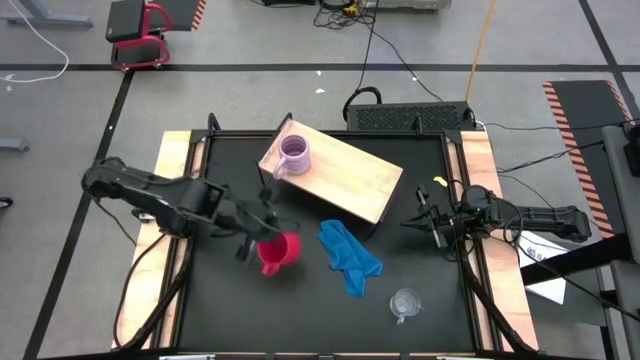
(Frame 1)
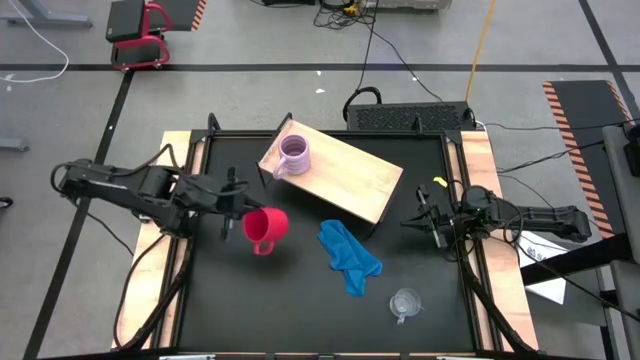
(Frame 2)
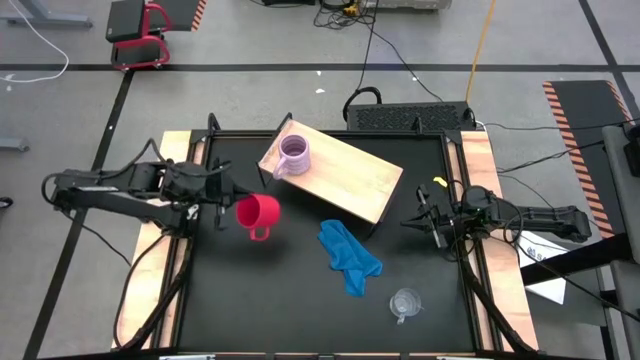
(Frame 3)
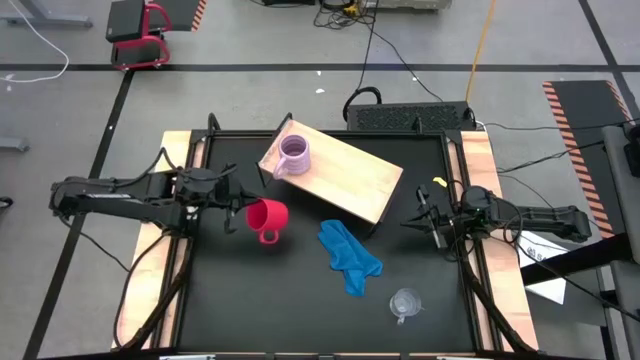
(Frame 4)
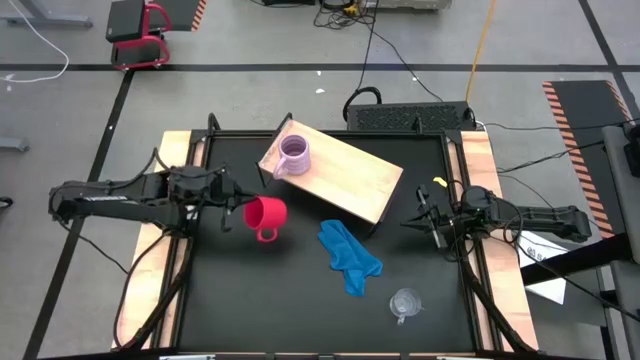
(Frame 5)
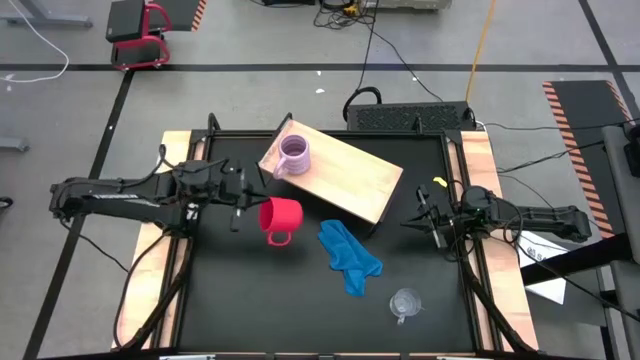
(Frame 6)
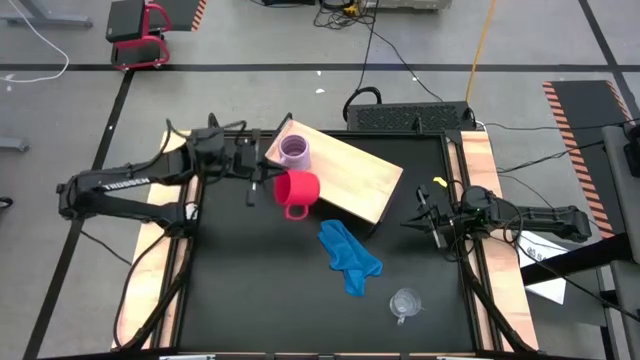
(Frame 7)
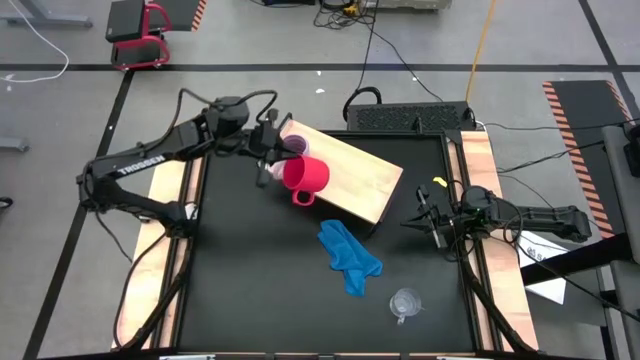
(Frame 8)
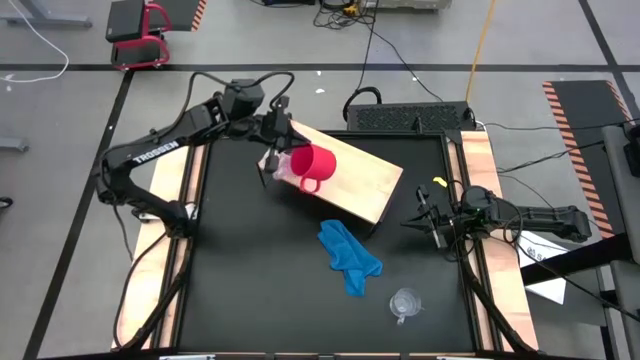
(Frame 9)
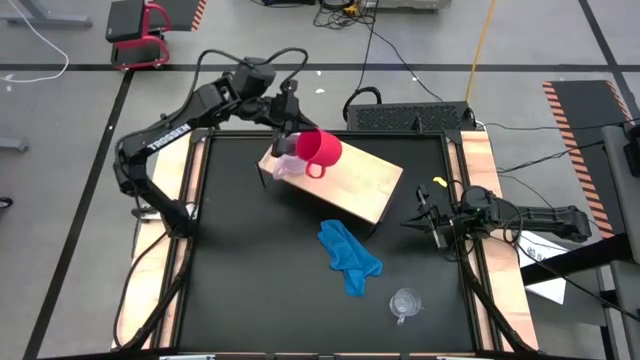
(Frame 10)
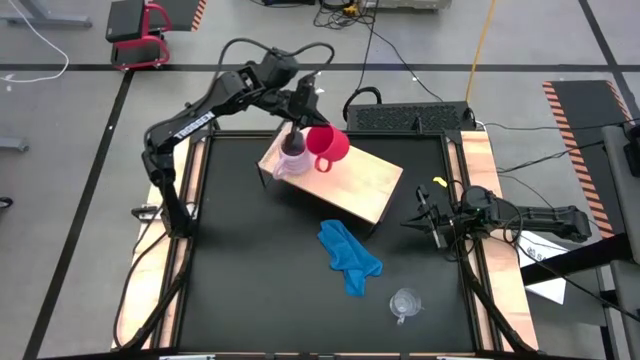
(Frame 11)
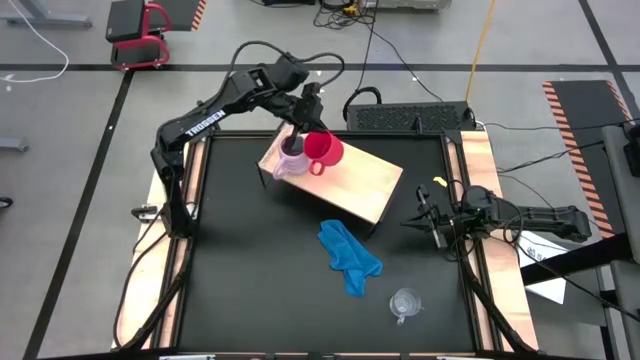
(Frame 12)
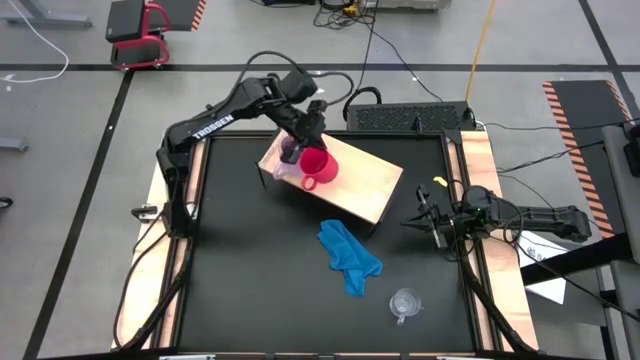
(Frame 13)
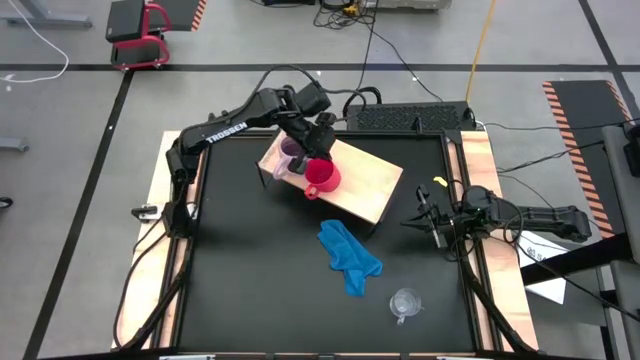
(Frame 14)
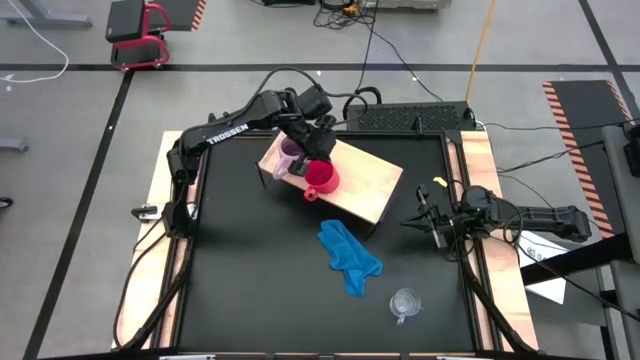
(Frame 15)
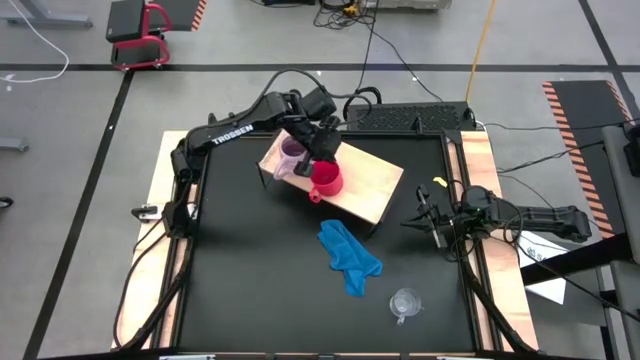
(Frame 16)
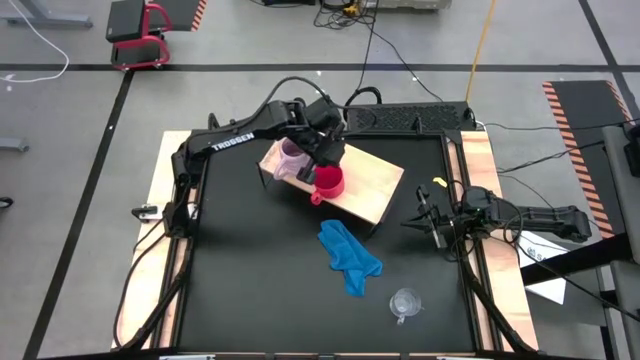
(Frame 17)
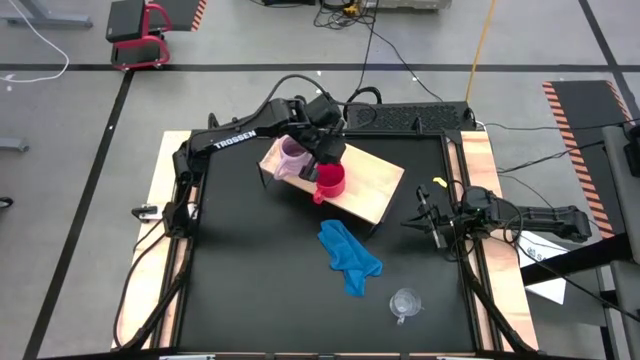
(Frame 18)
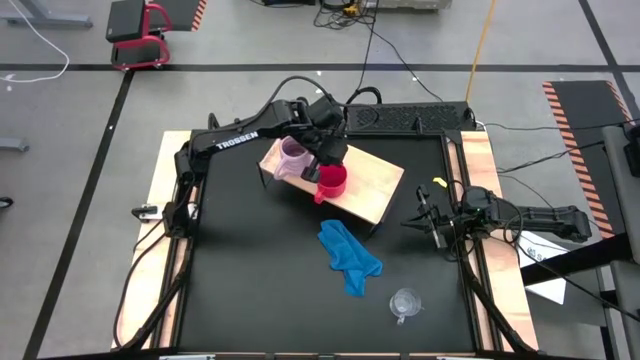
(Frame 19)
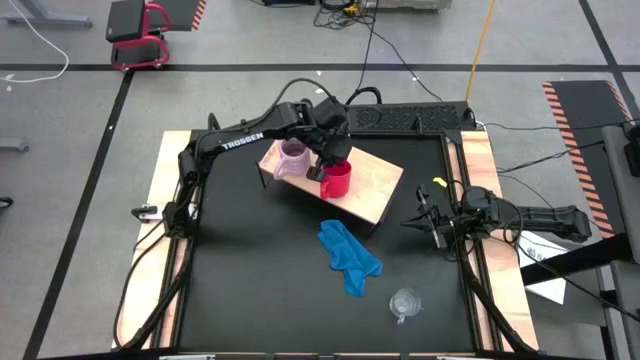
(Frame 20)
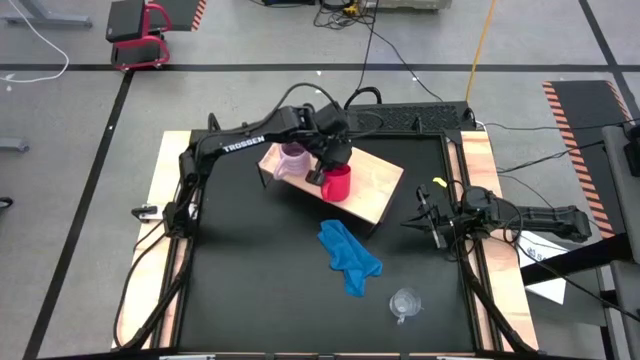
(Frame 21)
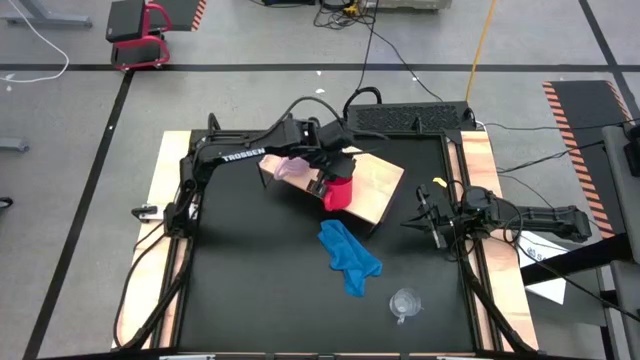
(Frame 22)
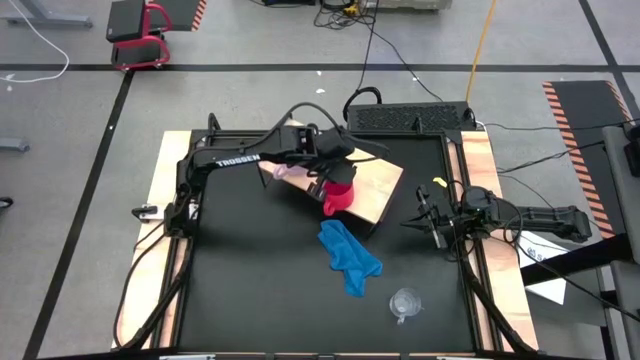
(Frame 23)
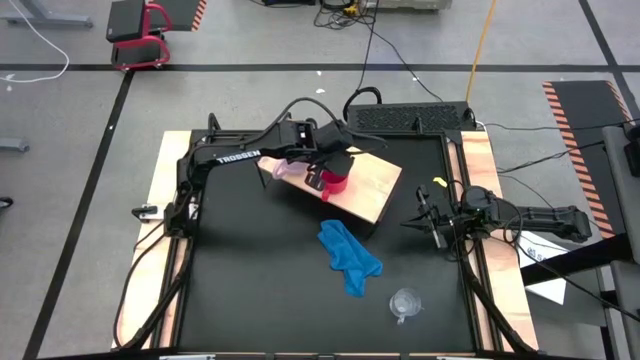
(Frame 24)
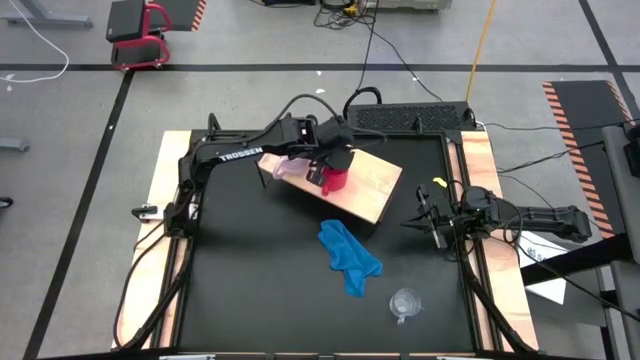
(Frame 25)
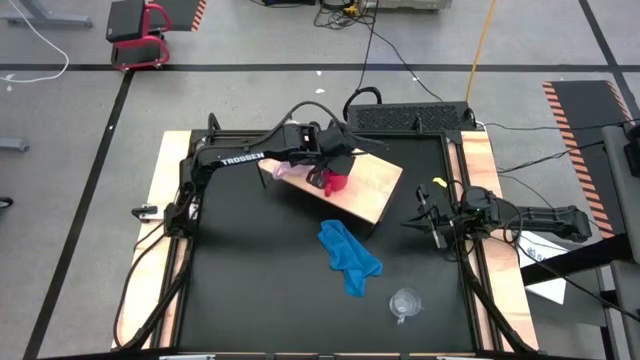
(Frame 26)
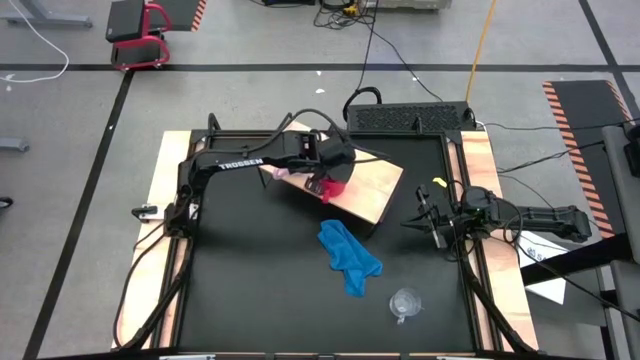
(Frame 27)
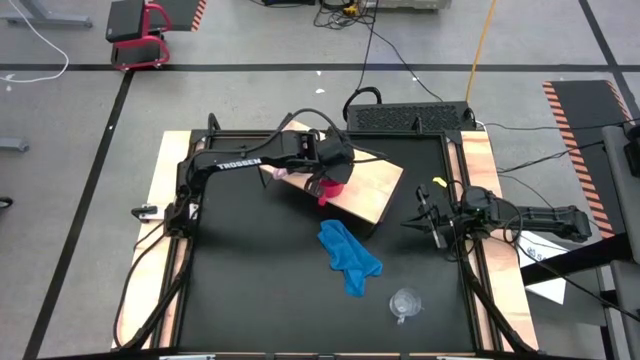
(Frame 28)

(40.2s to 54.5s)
Task: Stack small to large cups/mugs on shelf
Put the red mug on the shelf

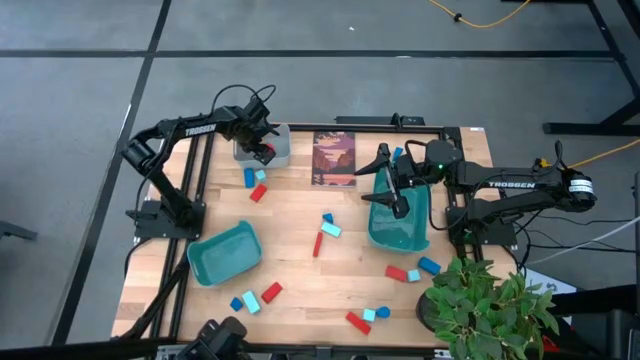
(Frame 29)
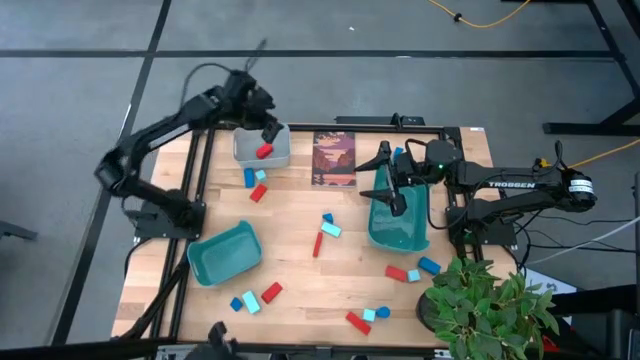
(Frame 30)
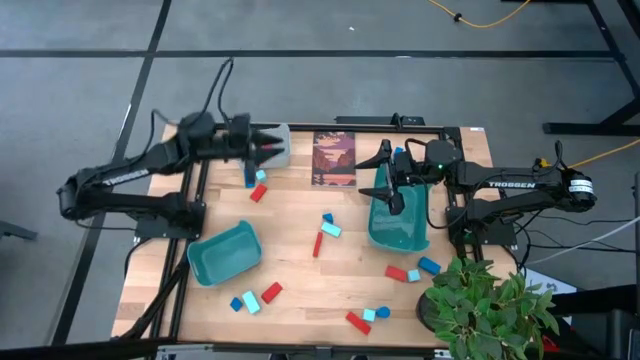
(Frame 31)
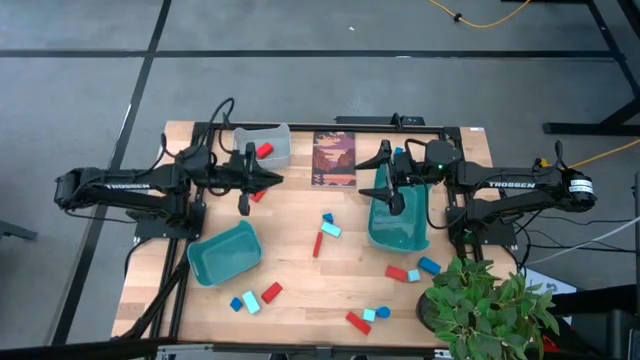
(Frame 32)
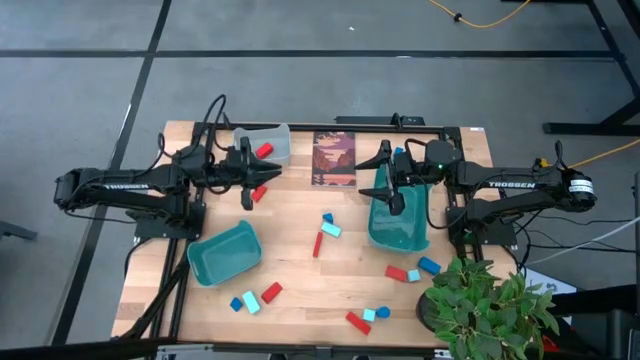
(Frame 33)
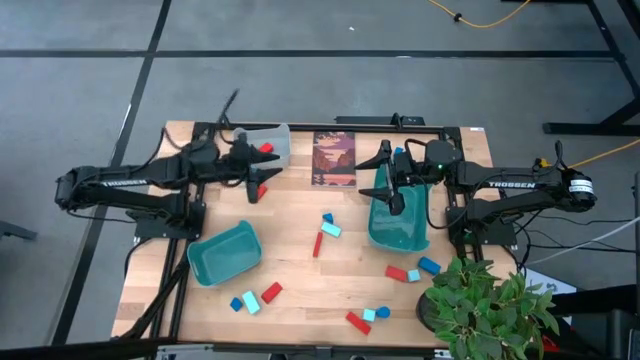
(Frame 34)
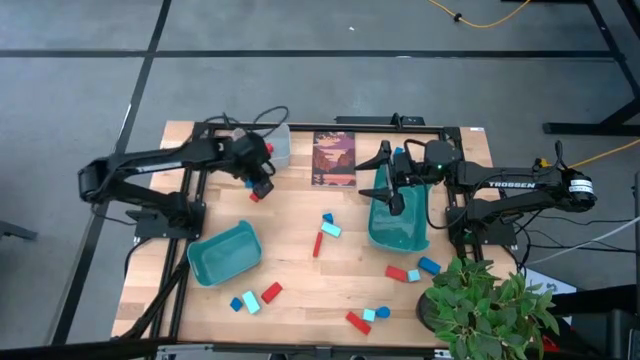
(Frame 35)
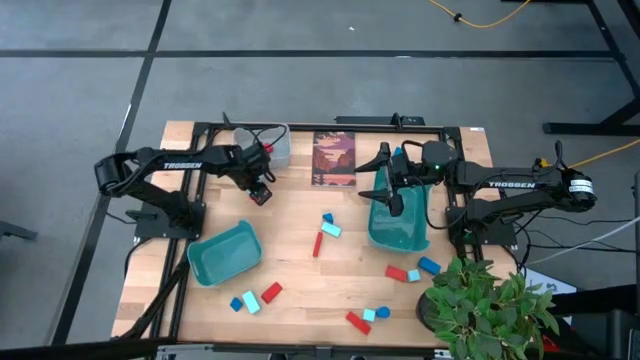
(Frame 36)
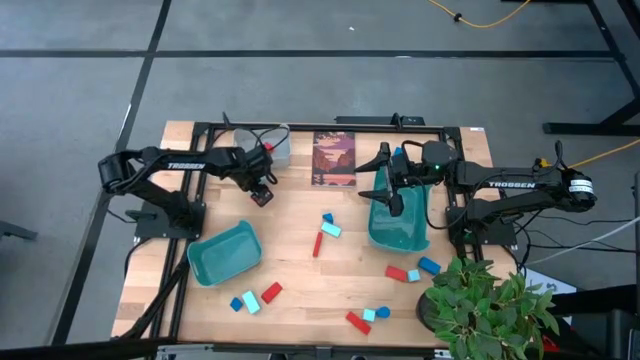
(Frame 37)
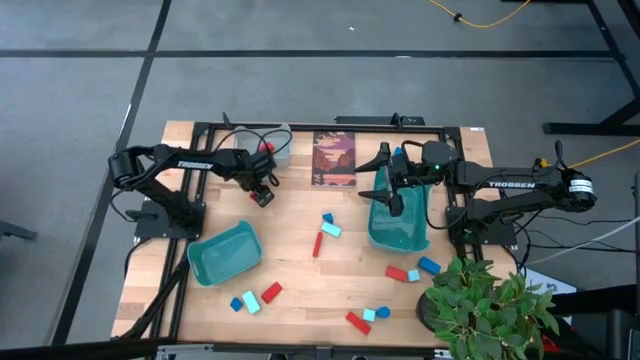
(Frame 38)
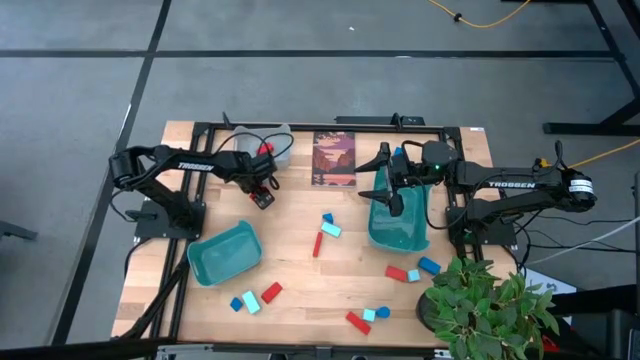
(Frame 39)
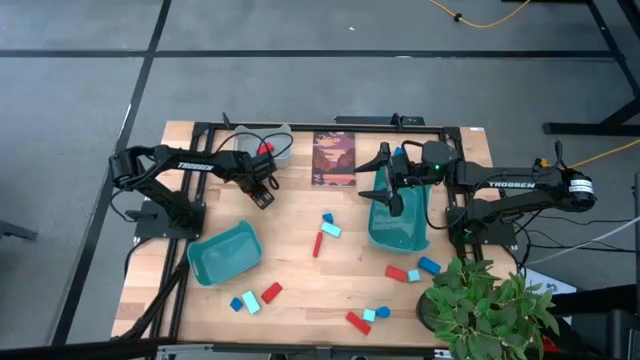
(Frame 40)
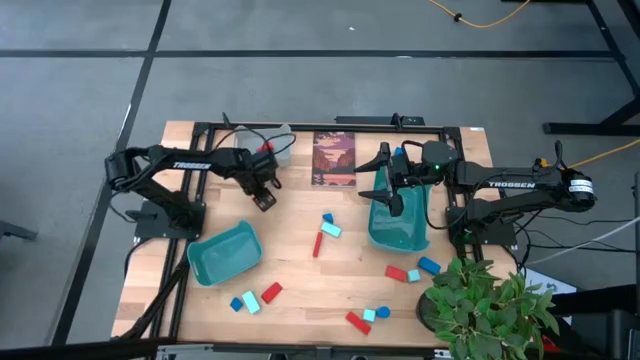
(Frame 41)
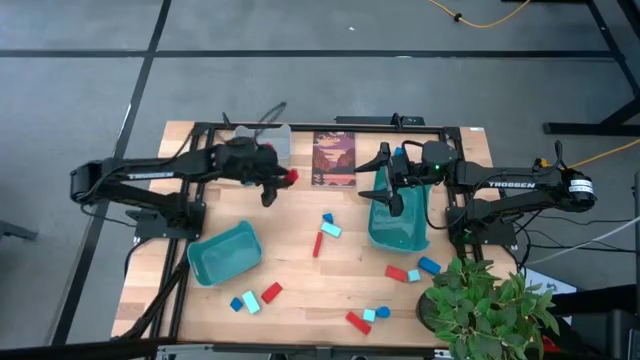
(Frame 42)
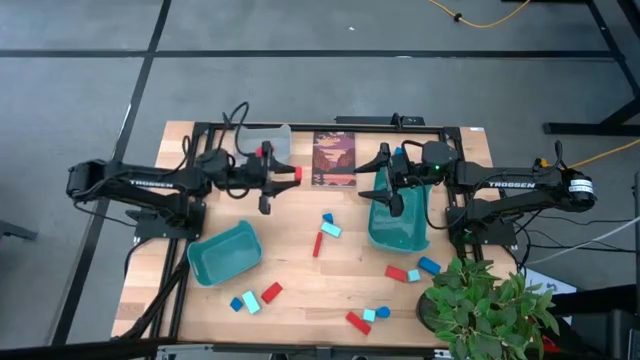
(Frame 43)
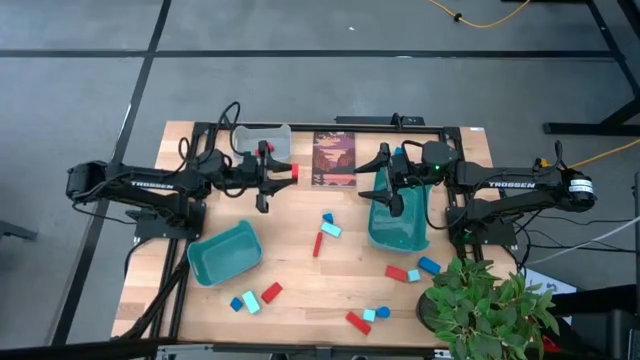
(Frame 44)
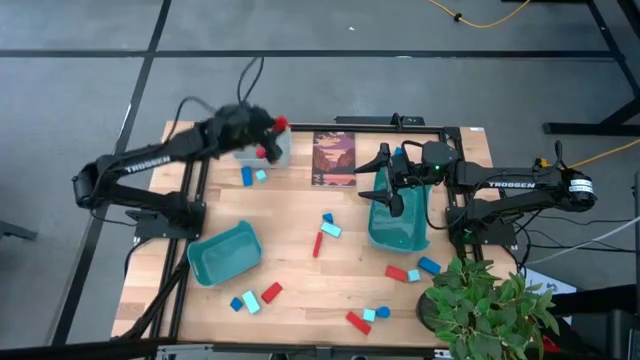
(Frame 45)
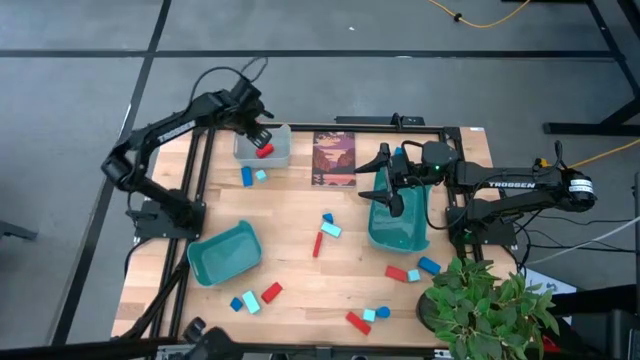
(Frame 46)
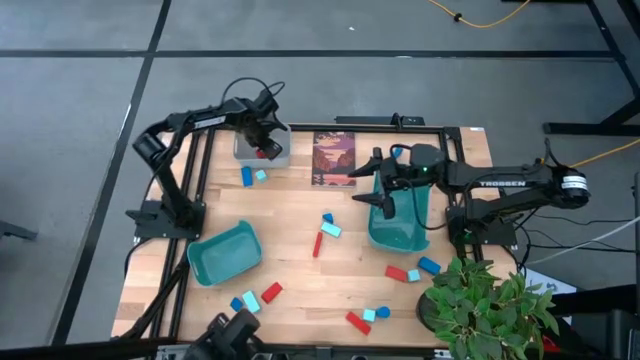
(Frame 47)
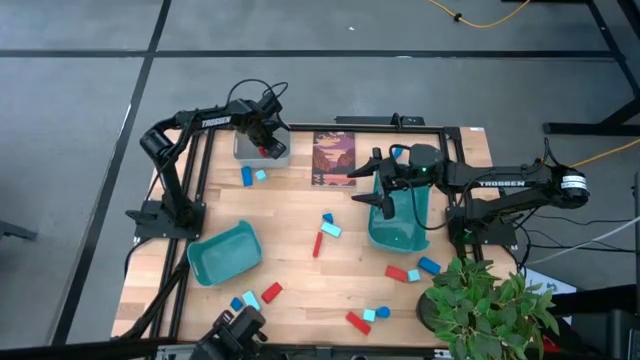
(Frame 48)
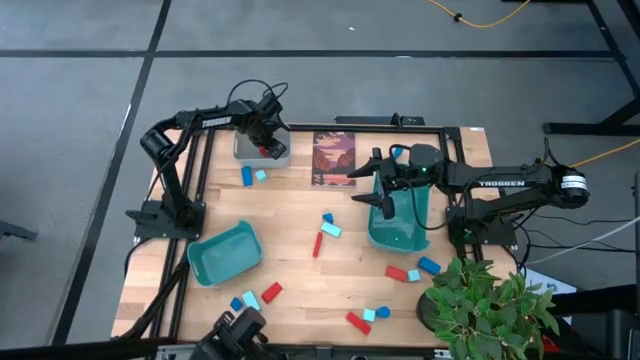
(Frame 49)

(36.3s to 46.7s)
Task: Sort & place blocks by color
Put the red block into the gray bin
